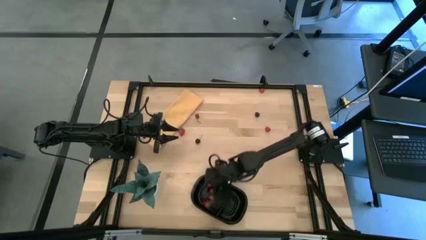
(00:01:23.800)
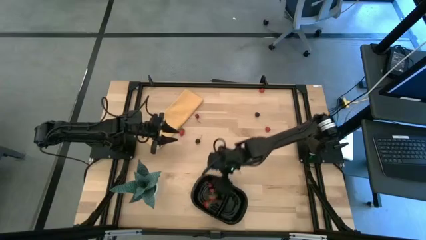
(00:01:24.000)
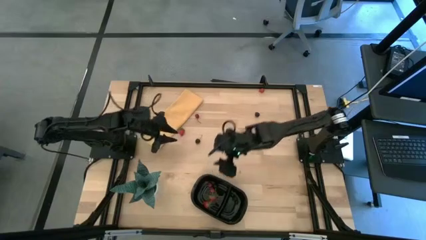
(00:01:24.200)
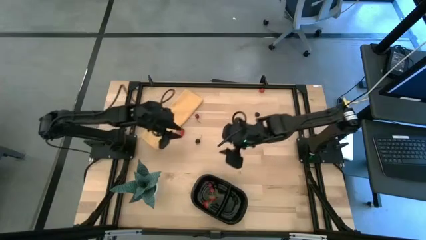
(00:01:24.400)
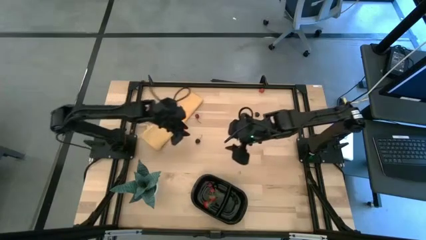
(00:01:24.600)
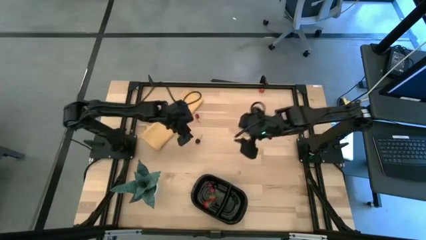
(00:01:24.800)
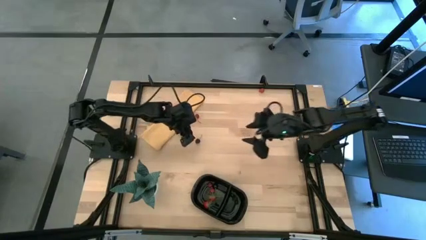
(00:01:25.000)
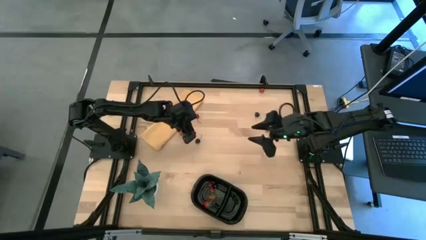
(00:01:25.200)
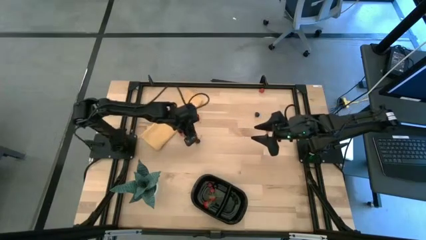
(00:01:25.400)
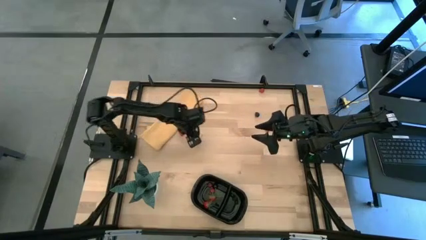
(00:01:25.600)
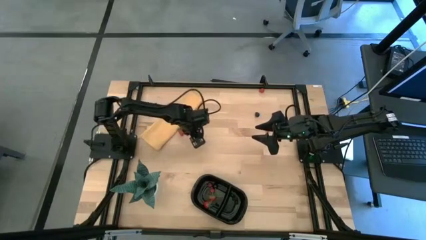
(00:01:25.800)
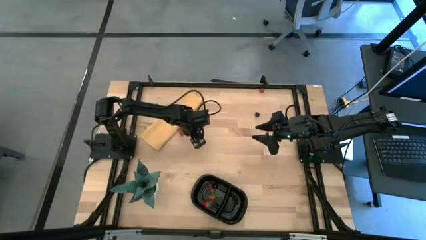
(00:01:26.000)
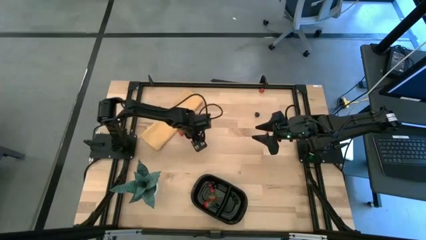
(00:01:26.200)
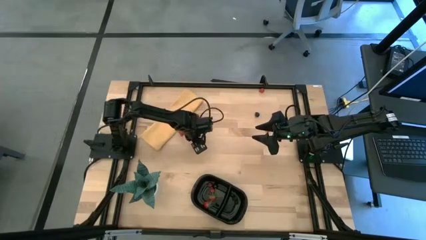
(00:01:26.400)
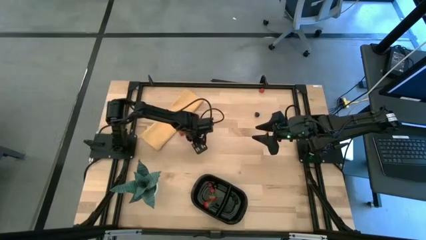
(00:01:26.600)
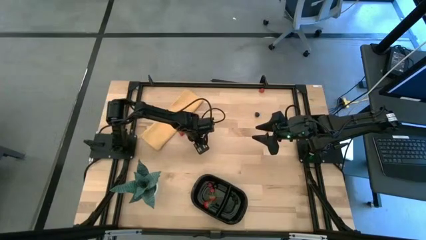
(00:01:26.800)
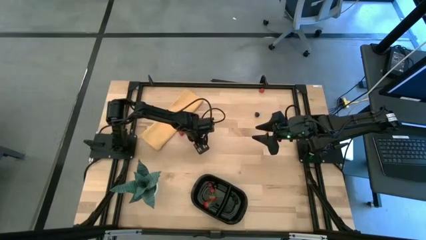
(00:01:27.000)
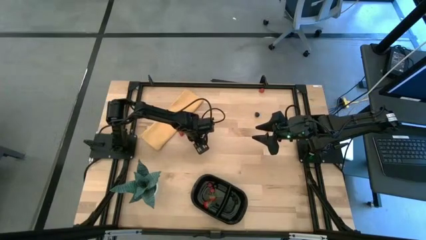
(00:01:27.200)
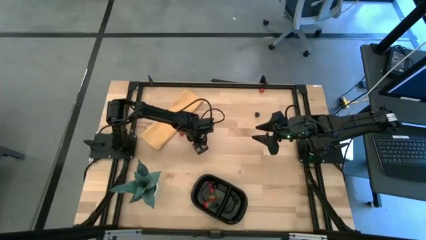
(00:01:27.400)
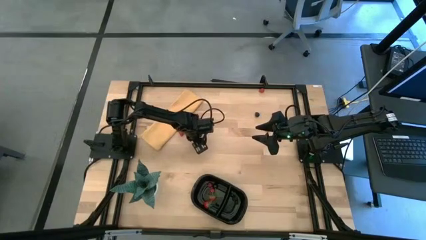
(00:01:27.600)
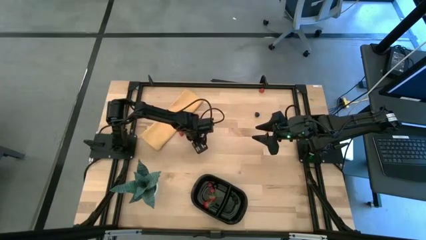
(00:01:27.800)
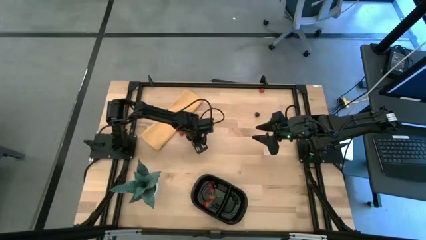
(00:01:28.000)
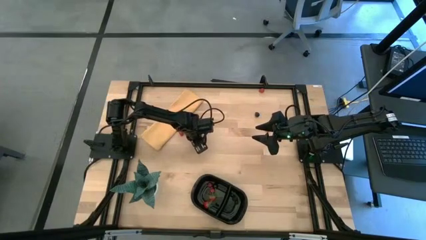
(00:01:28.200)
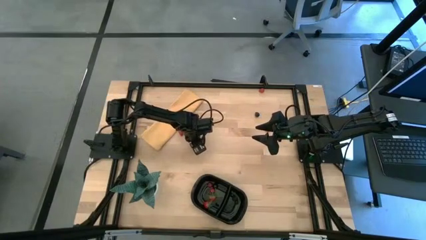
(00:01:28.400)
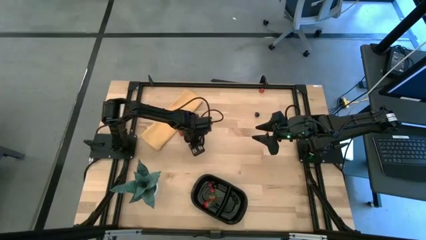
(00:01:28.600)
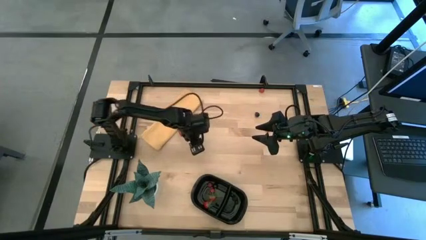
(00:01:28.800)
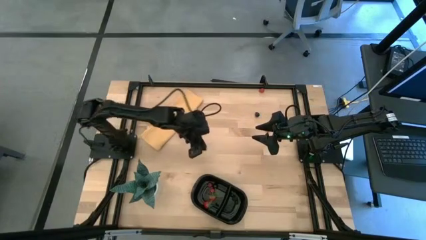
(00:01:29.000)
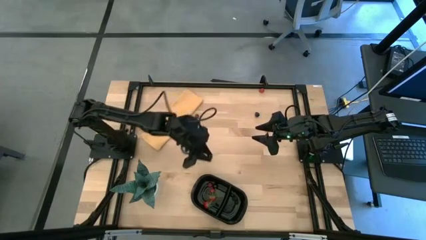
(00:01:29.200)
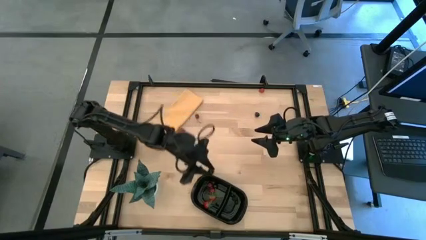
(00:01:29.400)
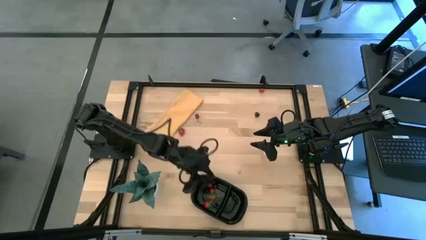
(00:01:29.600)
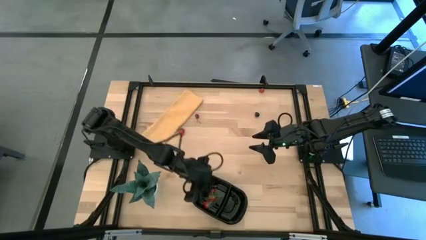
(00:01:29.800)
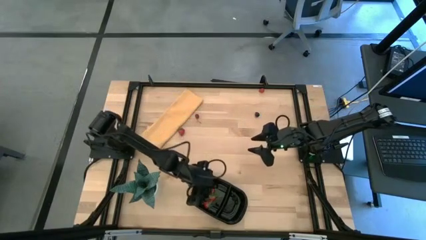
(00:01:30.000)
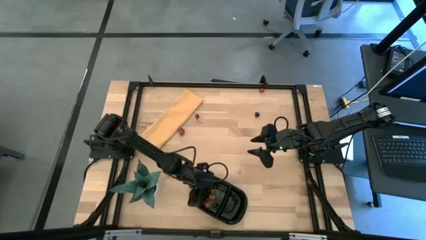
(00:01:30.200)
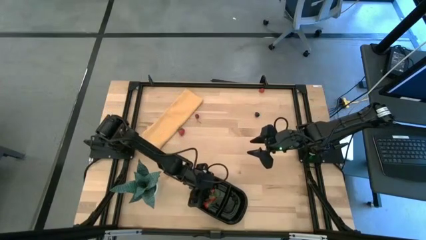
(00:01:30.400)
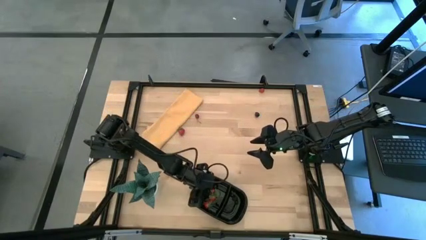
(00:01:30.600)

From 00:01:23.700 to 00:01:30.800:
Task: Pick and placing Produce into tupperware
Put the black cherry into the black container

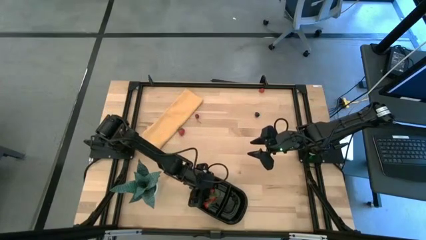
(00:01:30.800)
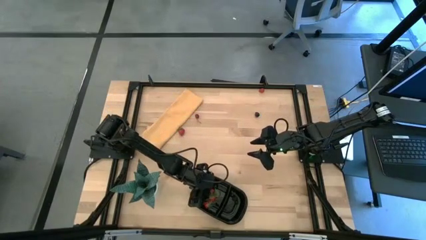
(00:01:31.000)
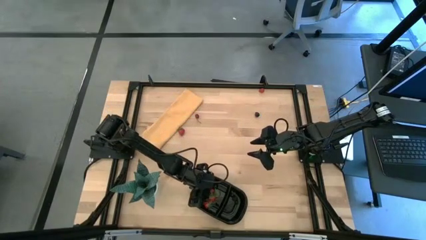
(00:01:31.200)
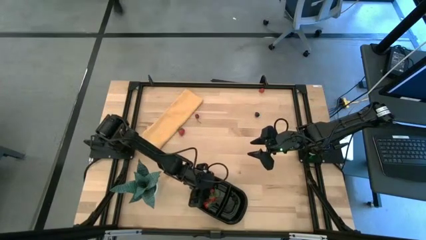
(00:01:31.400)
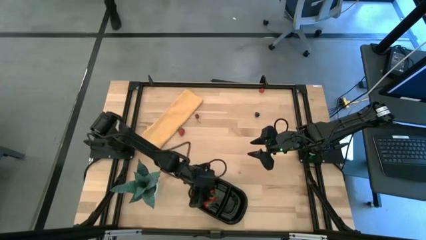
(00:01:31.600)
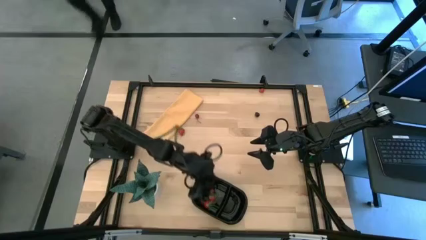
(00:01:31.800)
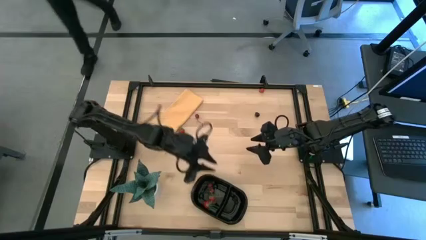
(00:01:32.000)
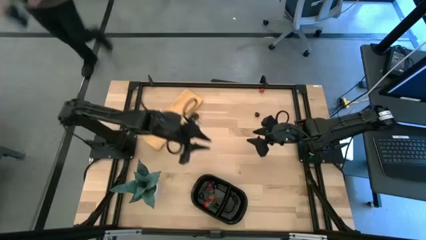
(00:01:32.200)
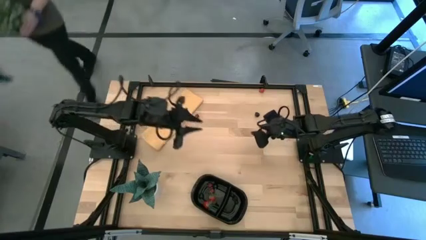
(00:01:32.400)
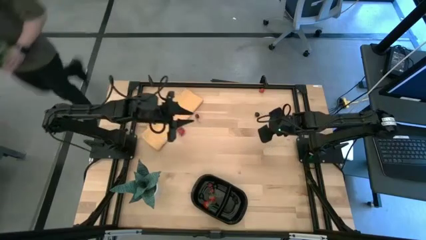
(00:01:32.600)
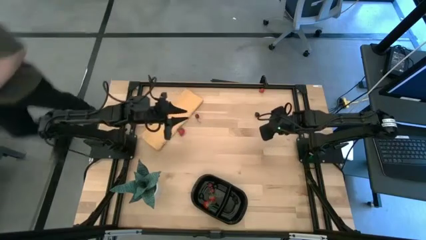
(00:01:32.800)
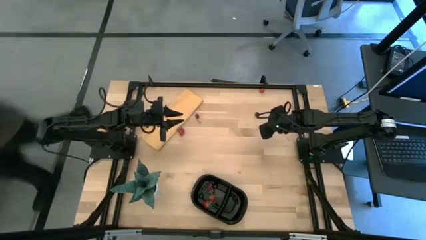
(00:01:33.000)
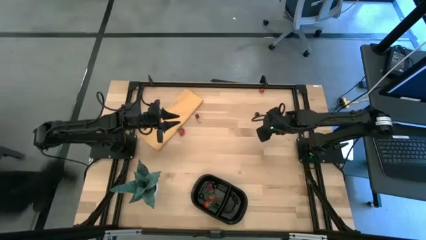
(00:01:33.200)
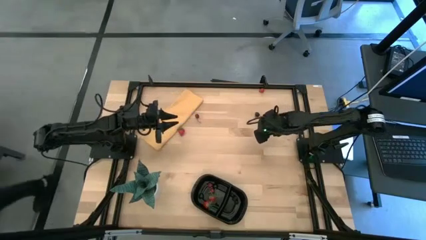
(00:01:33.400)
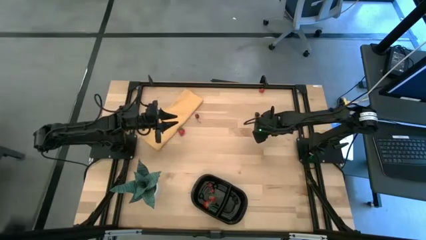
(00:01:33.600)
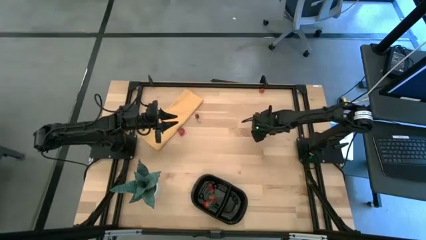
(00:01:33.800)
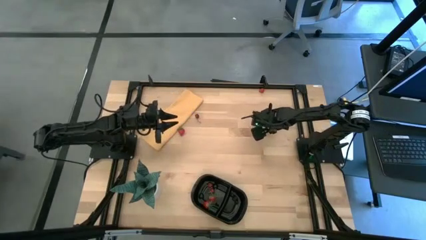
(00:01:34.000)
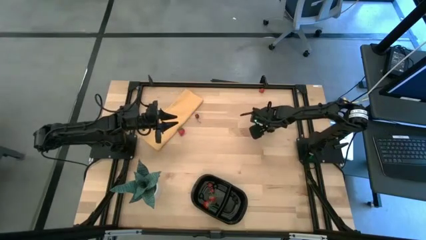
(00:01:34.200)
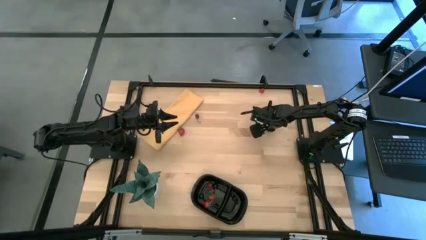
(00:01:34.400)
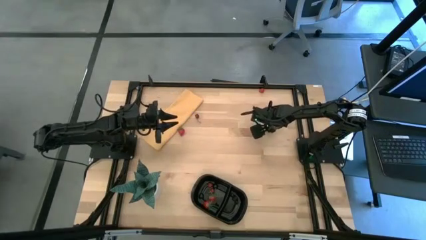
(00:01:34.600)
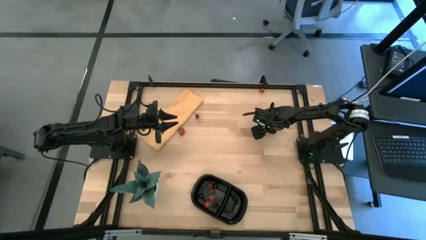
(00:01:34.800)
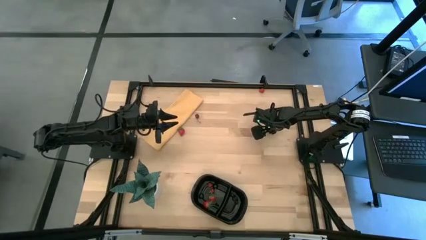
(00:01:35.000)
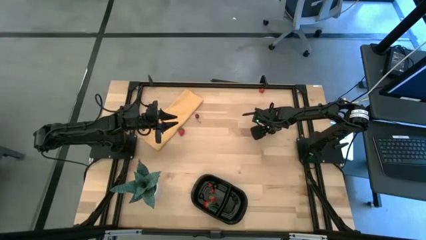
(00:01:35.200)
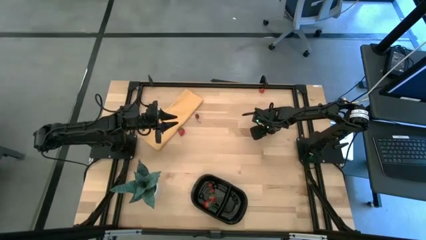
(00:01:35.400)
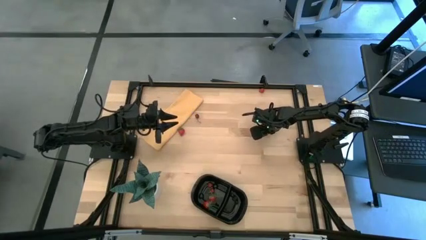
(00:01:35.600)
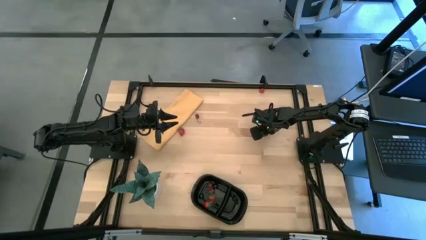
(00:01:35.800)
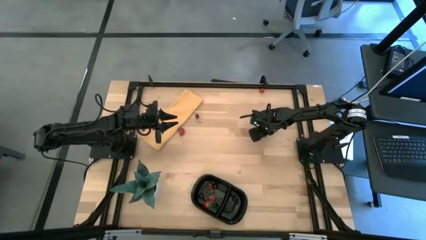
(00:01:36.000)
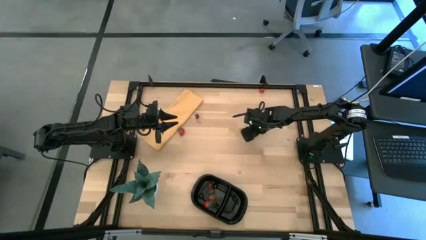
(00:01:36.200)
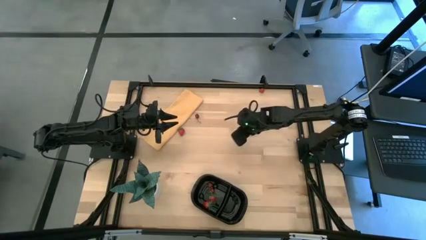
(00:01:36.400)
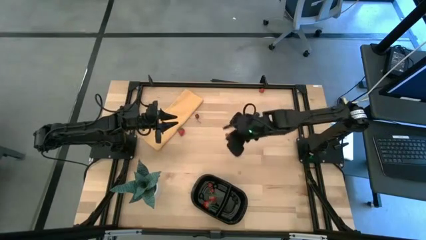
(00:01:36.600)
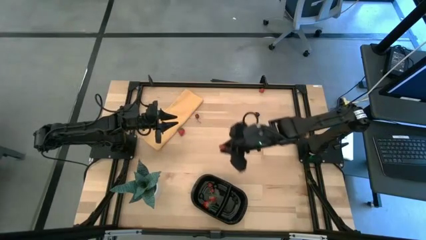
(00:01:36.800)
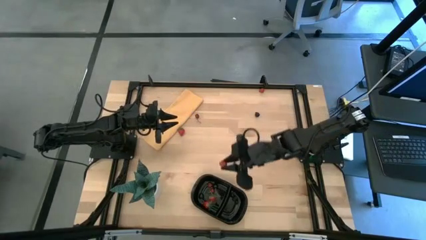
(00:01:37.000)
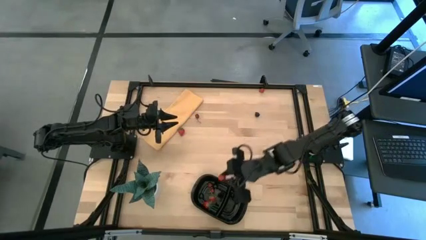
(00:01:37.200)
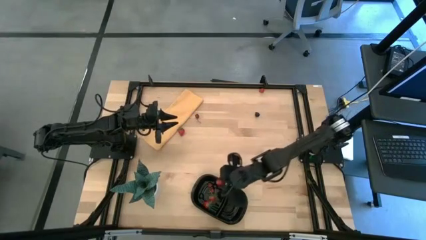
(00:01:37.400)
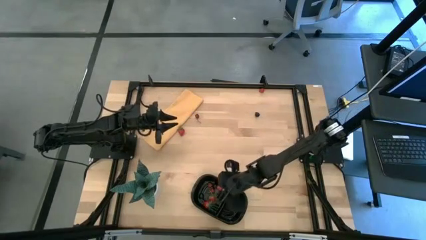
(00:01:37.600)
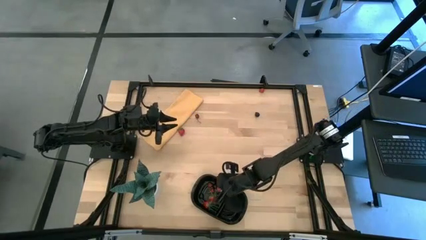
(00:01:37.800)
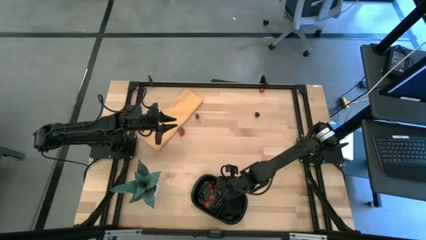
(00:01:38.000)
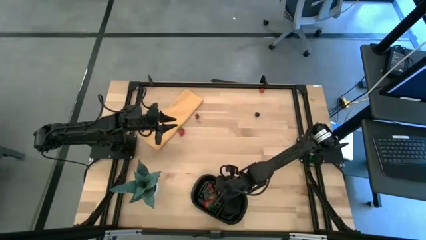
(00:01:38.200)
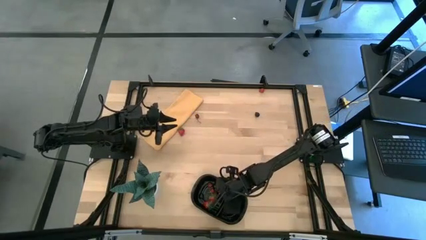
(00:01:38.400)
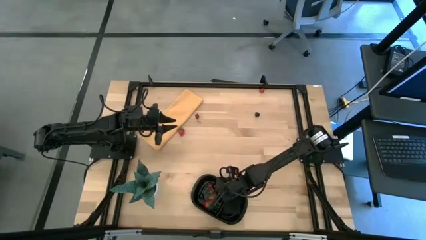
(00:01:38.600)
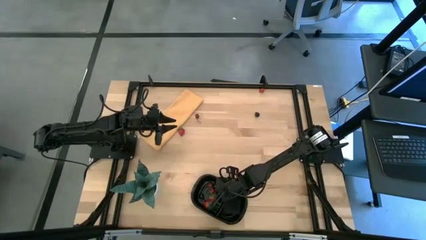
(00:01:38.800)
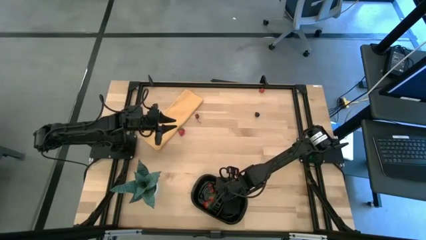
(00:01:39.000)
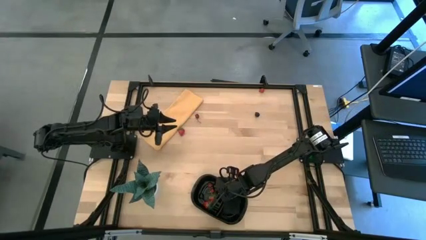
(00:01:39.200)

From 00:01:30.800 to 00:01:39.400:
Put the bottom red raspberry into the black container
